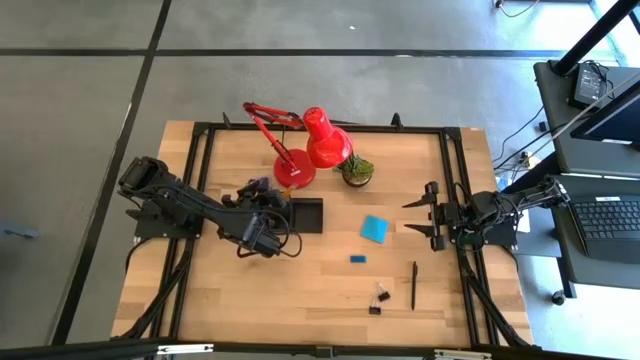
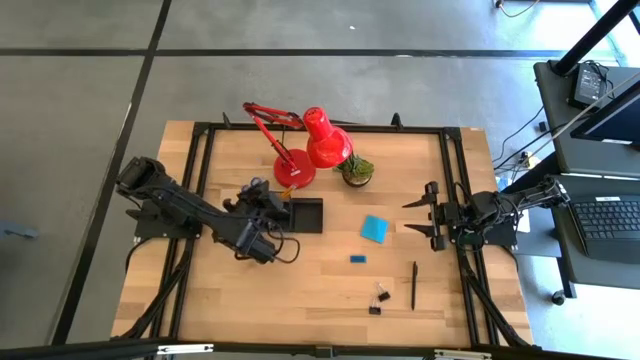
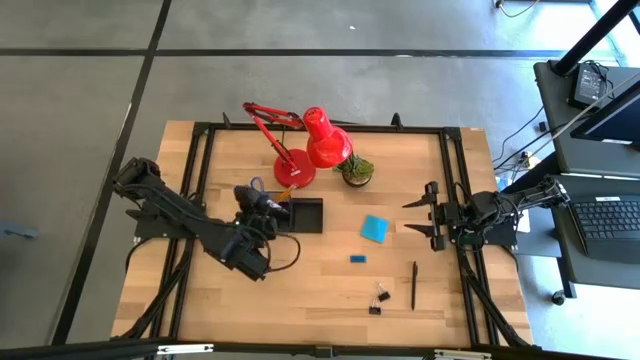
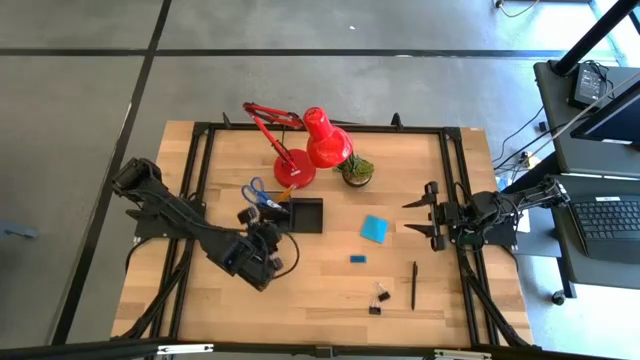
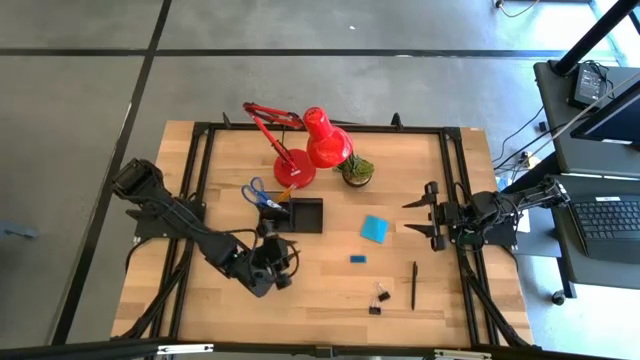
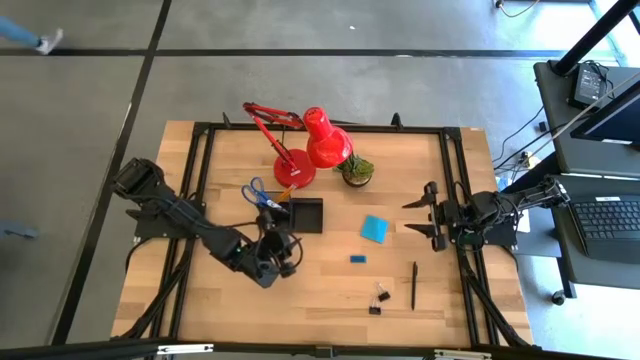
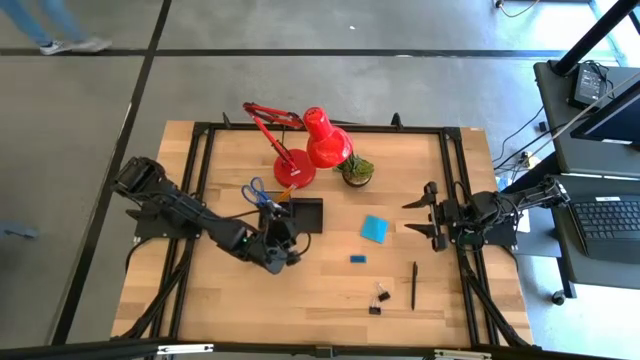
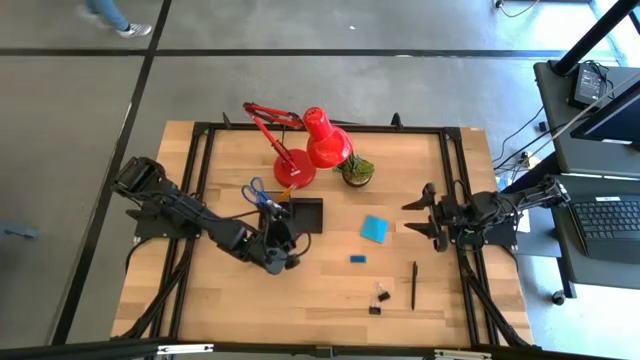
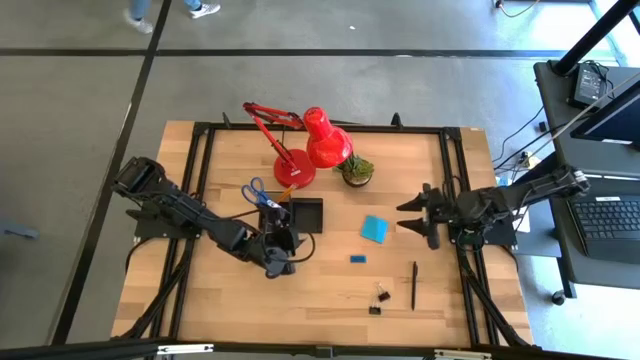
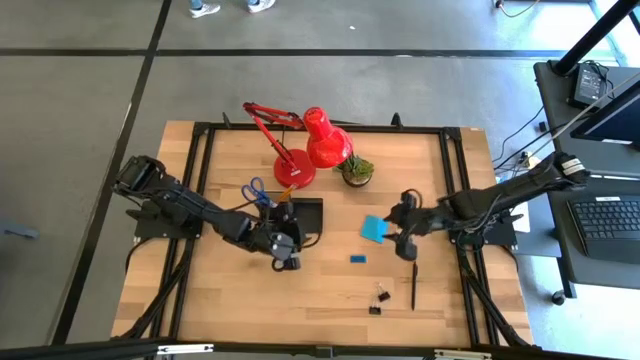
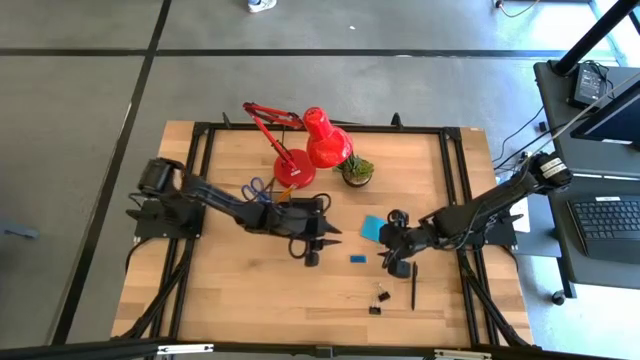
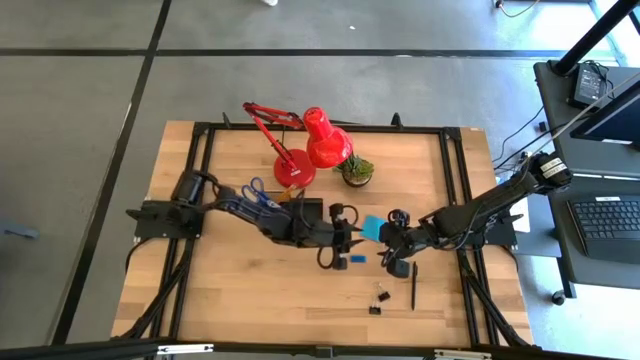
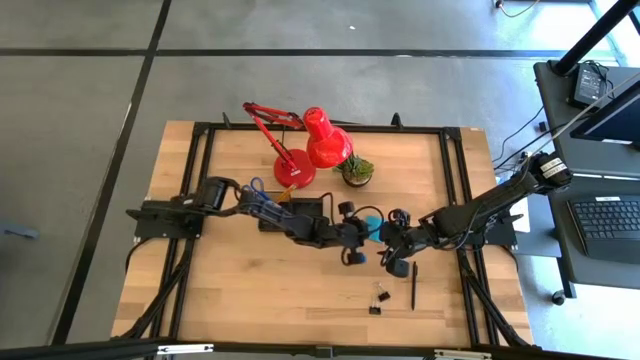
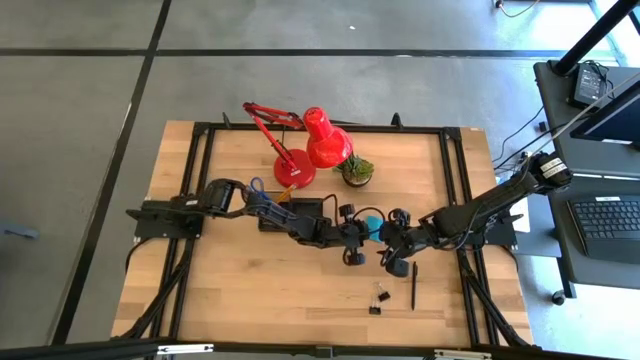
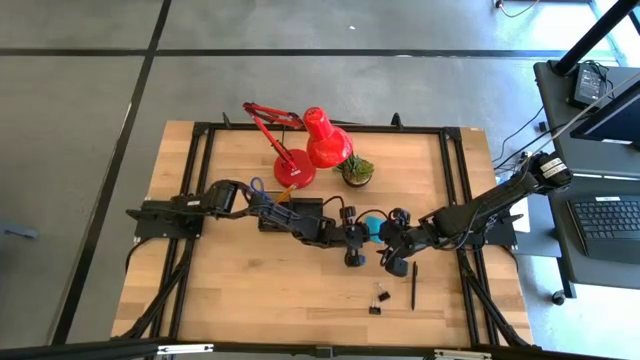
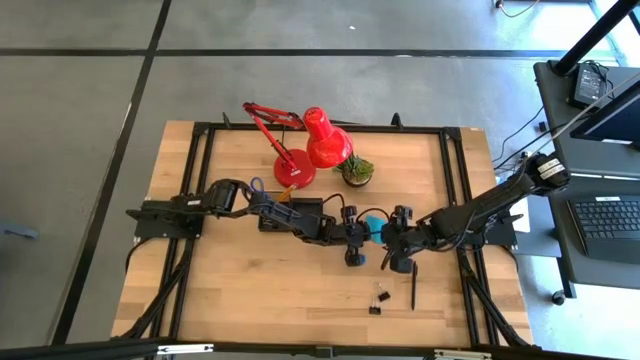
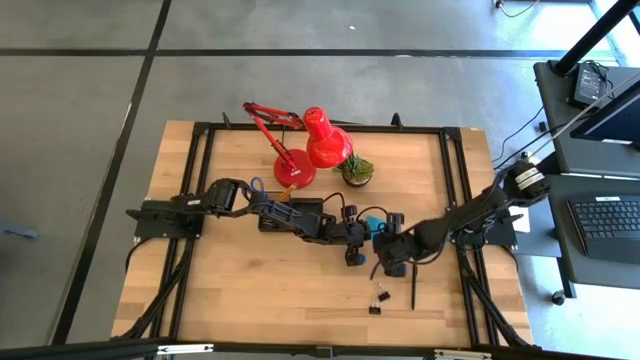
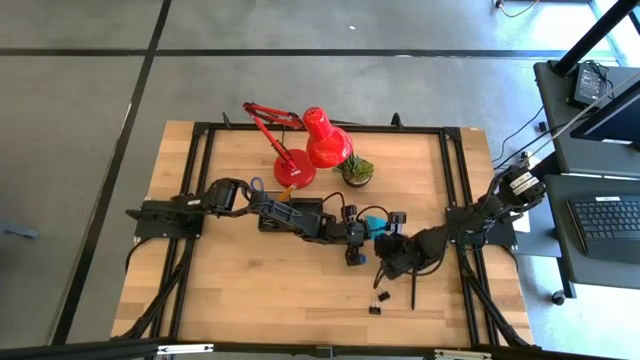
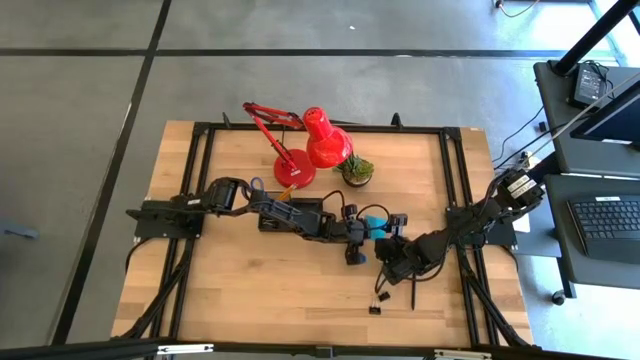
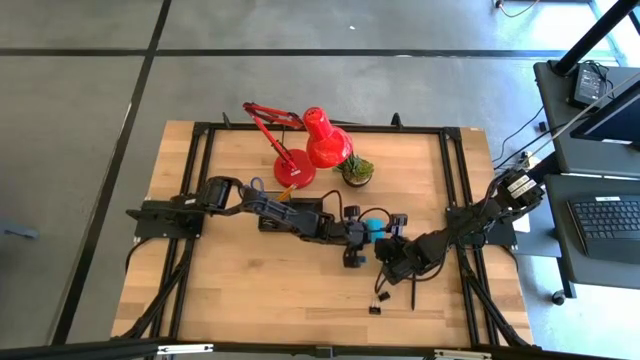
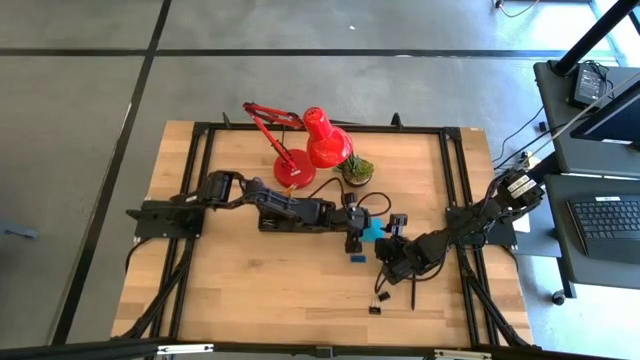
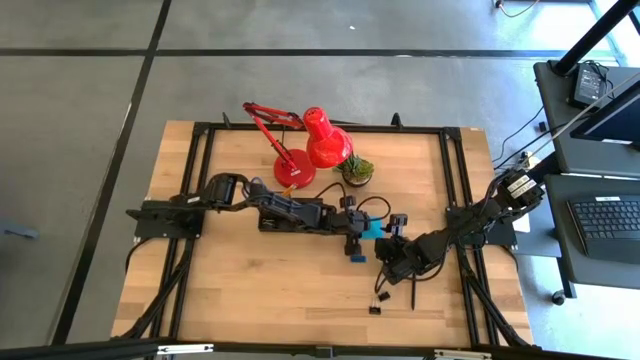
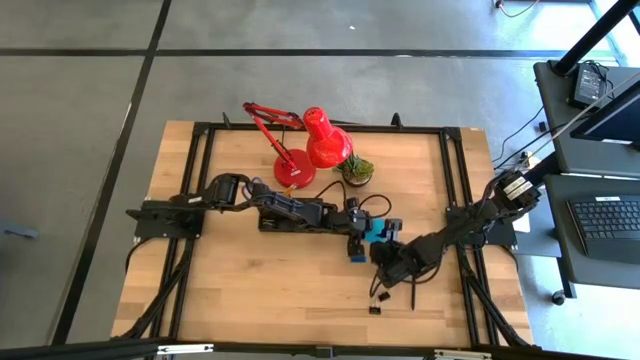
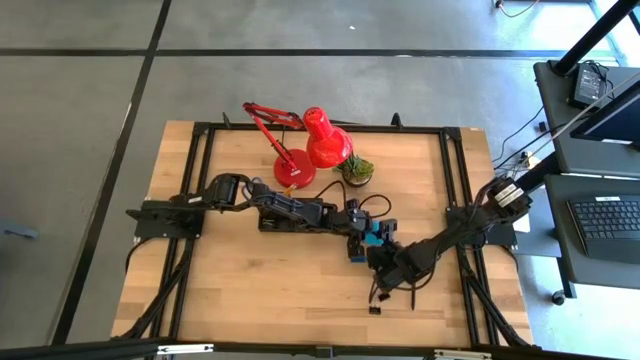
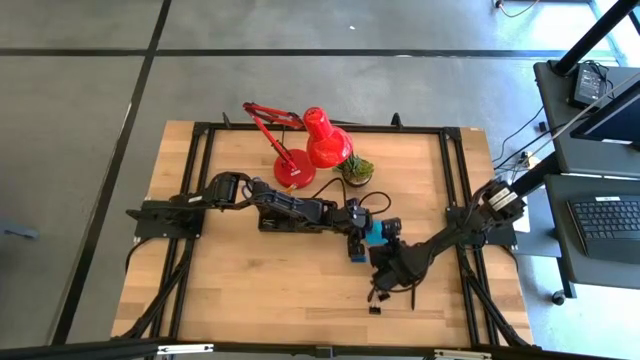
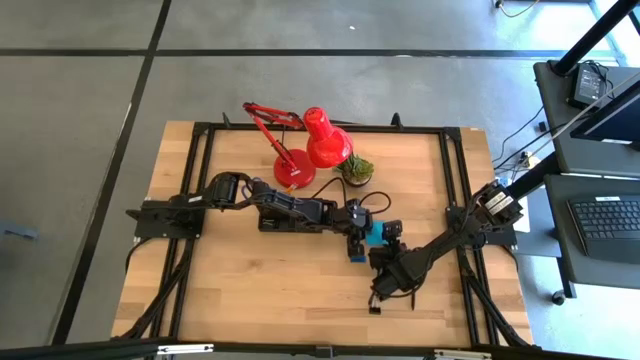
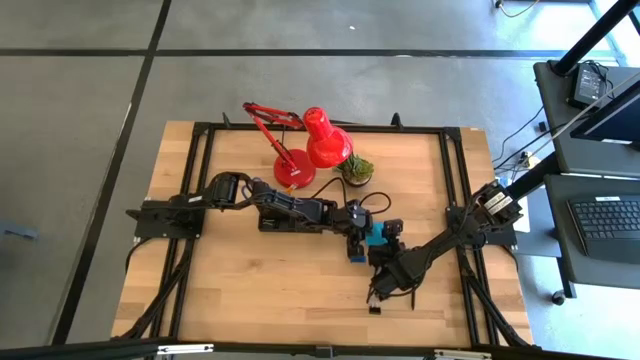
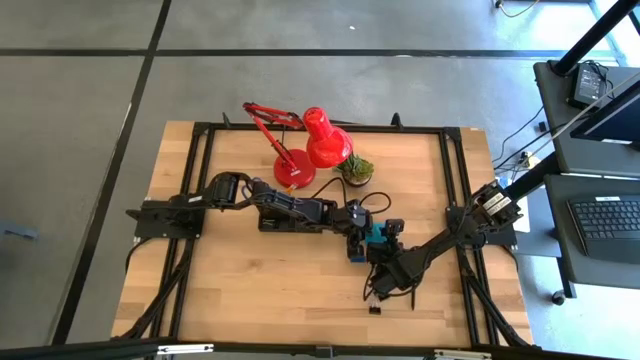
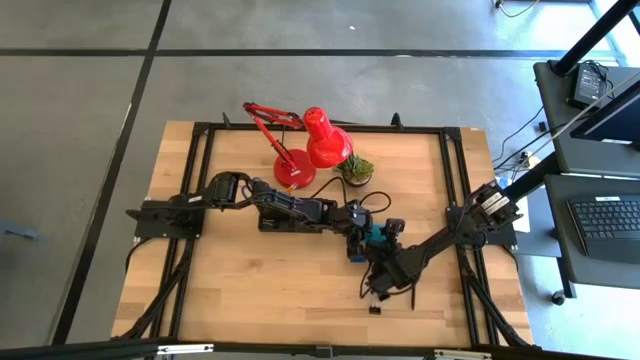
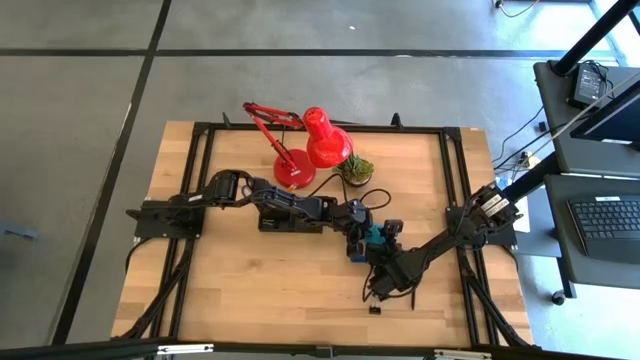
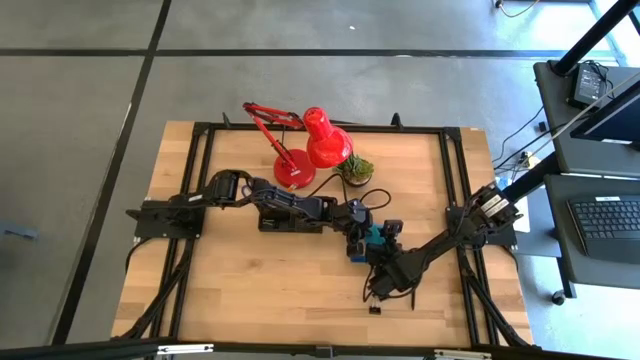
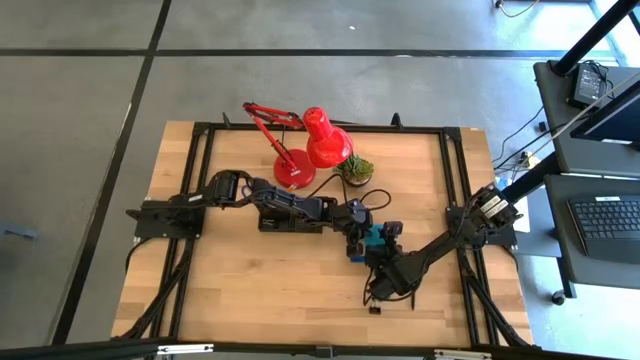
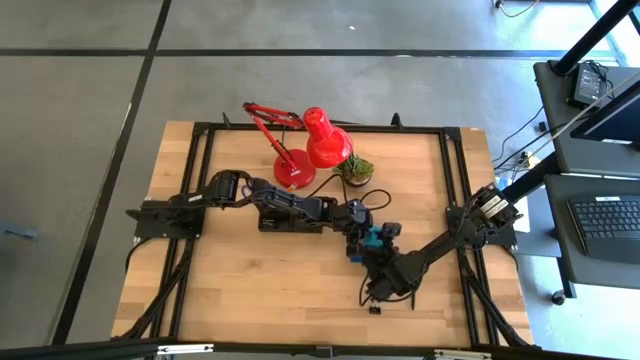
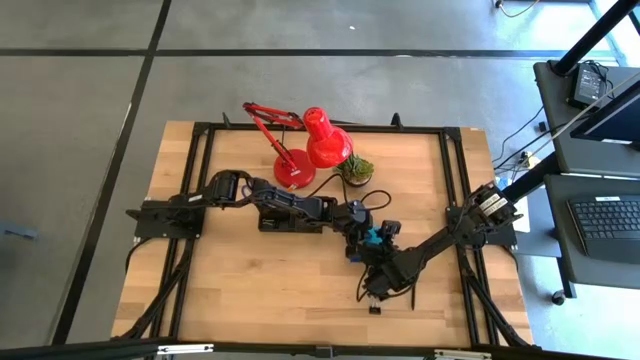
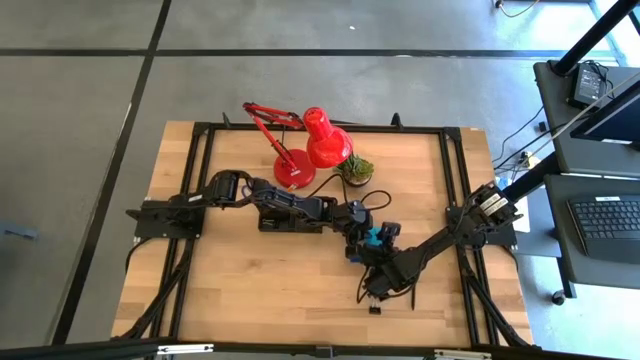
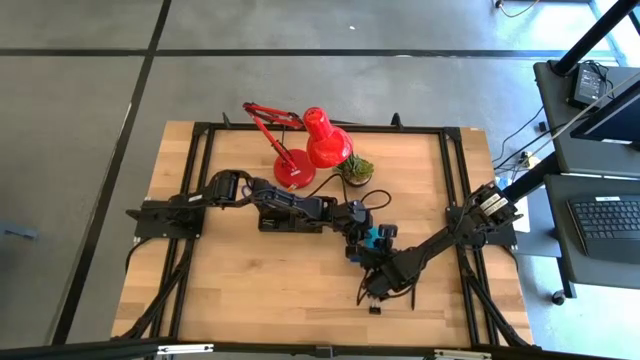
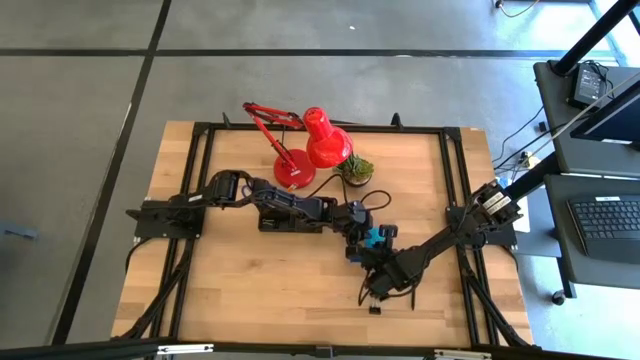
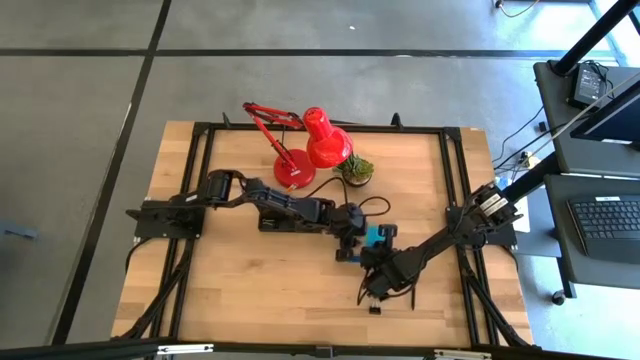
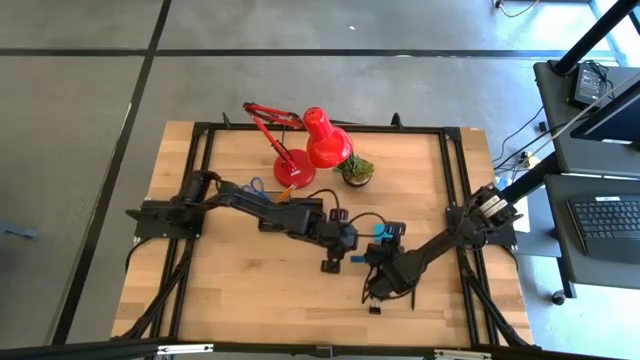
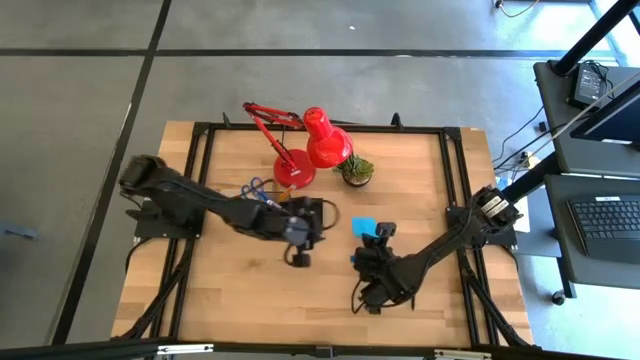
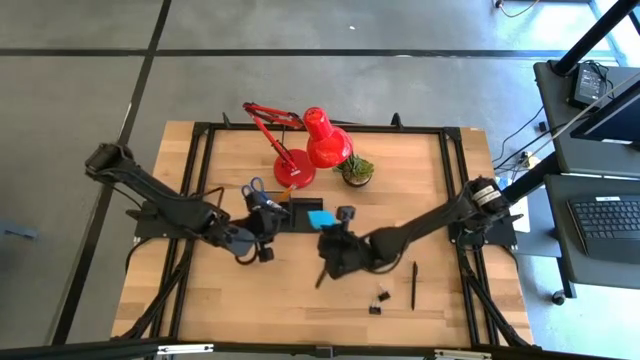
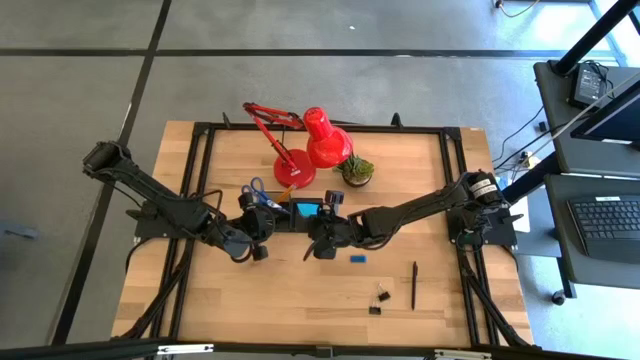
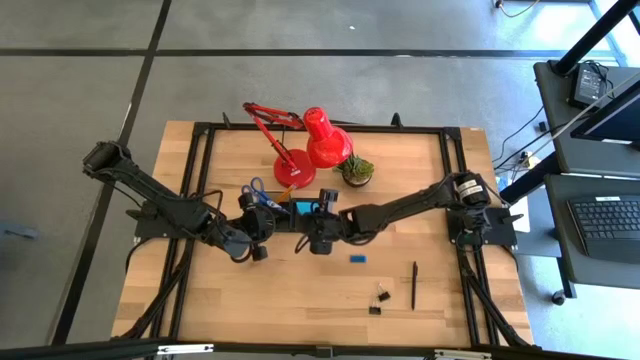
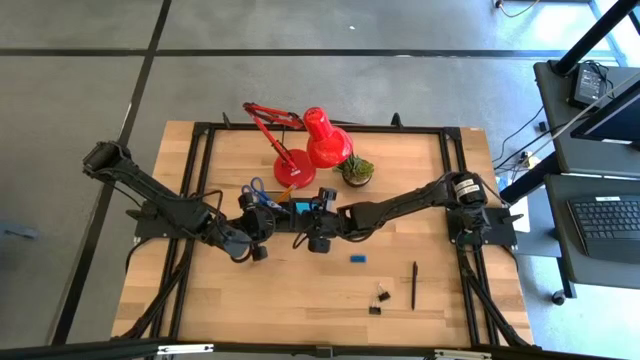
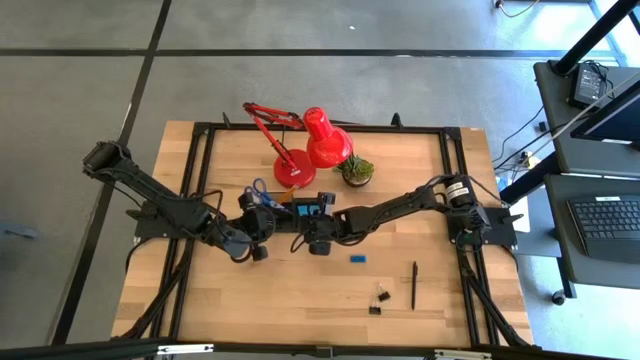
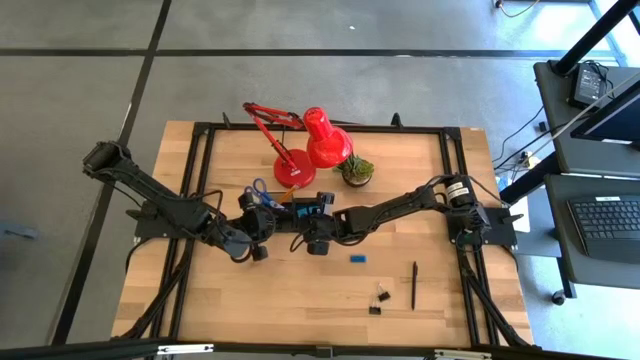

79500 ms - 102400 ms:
Task: Pick and place office supplies into organizer
Put the blue sticky notes into the black desk organizer
